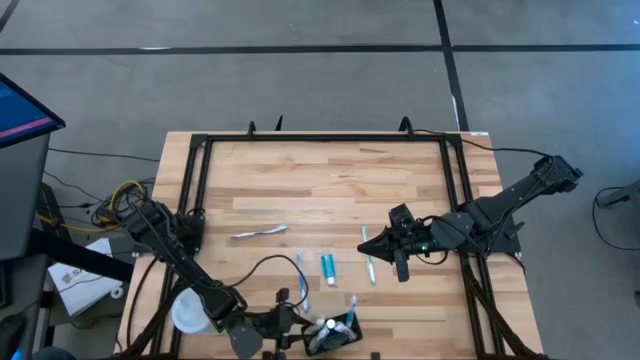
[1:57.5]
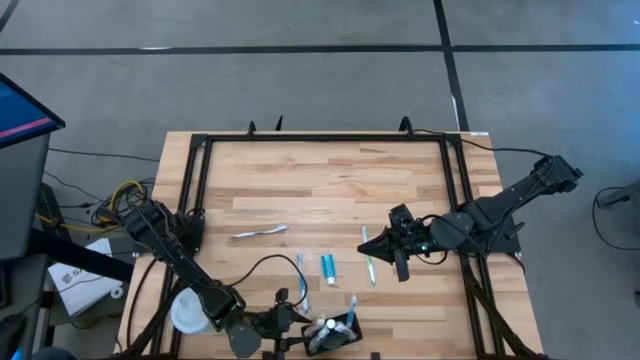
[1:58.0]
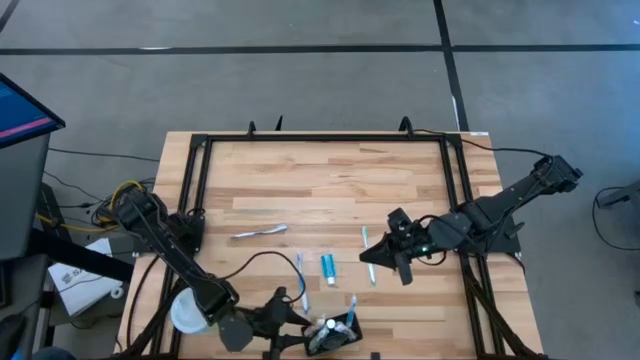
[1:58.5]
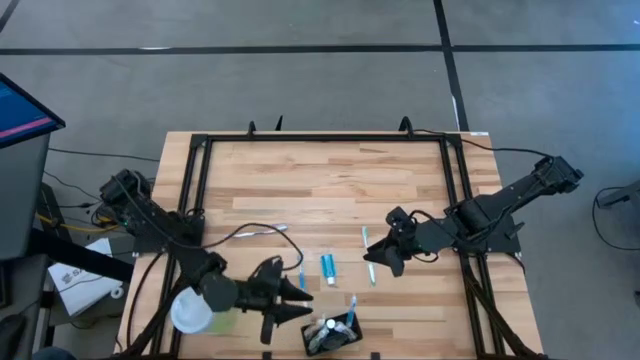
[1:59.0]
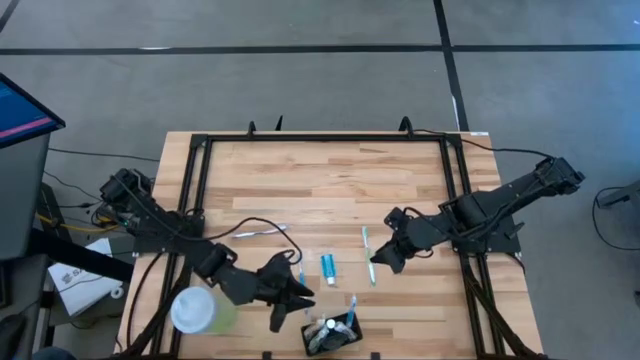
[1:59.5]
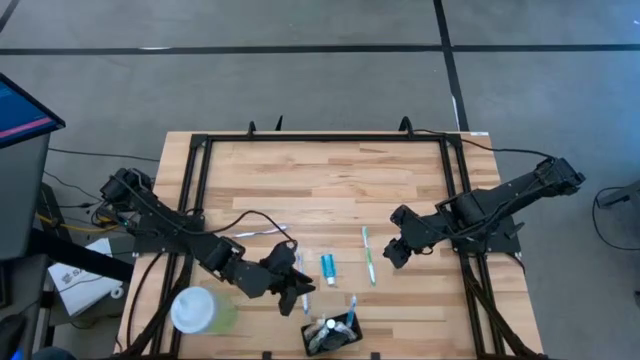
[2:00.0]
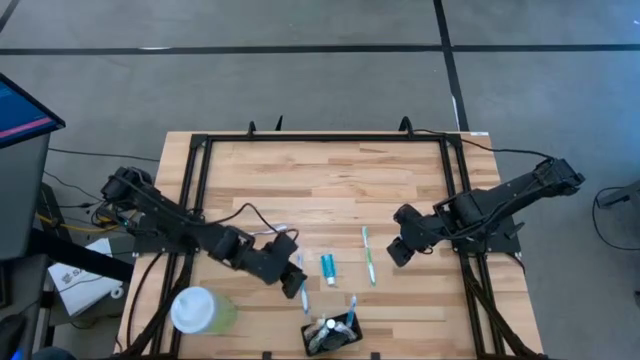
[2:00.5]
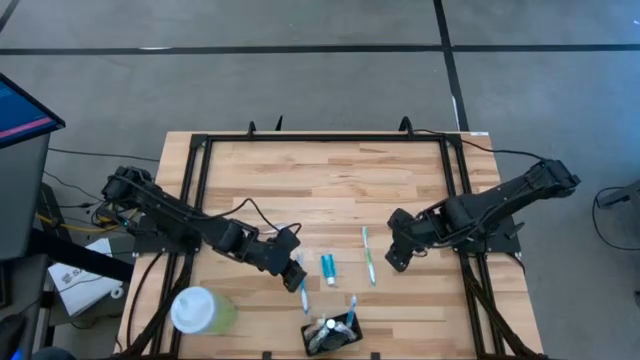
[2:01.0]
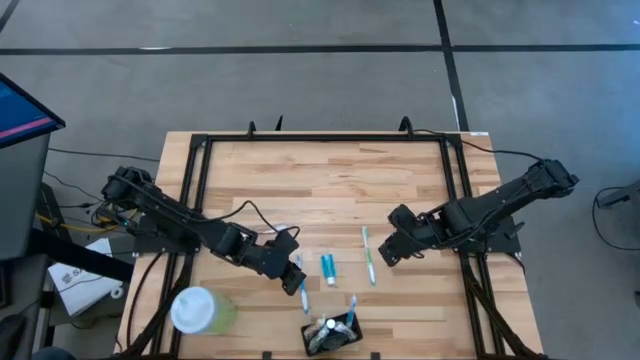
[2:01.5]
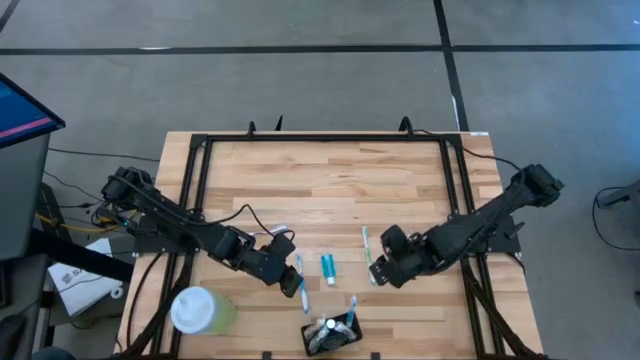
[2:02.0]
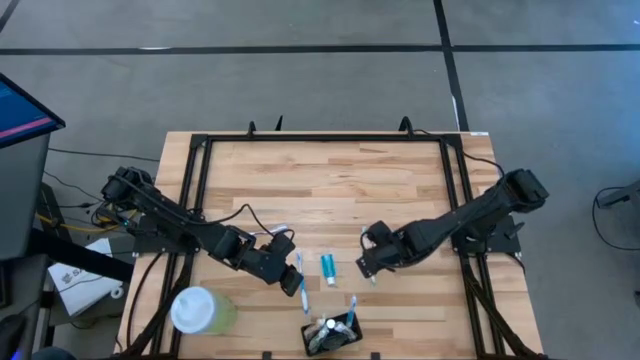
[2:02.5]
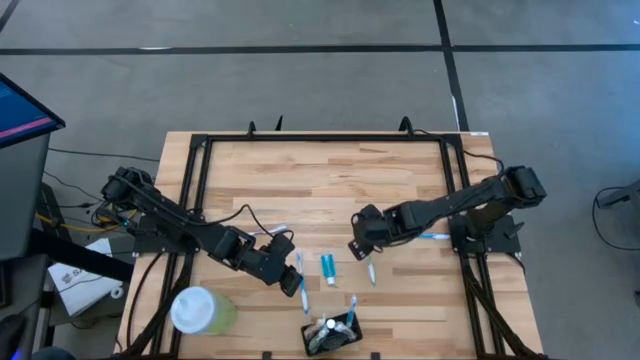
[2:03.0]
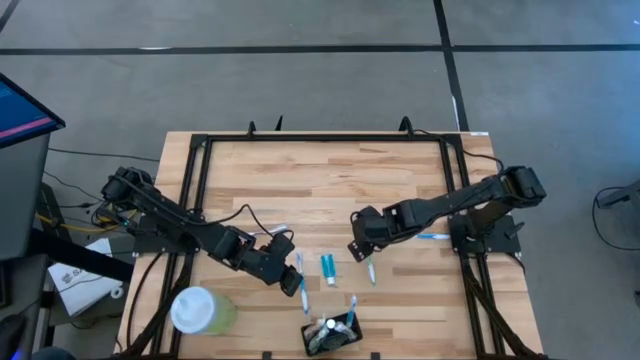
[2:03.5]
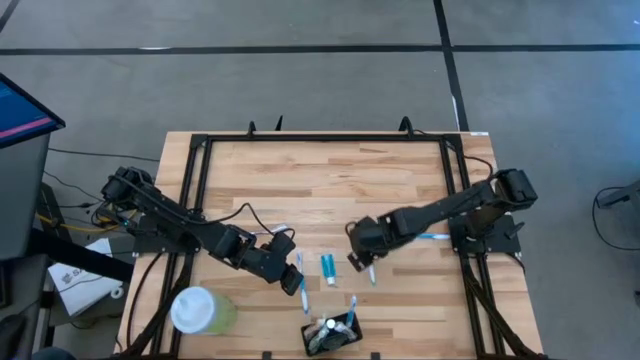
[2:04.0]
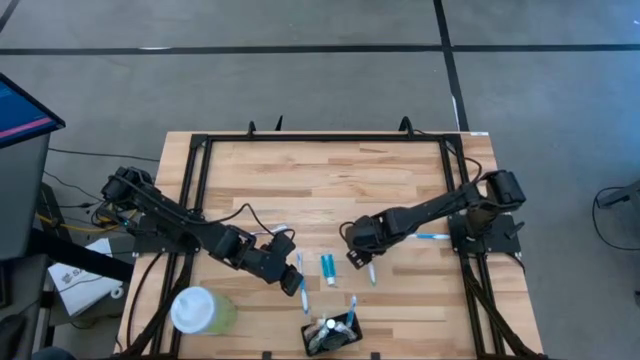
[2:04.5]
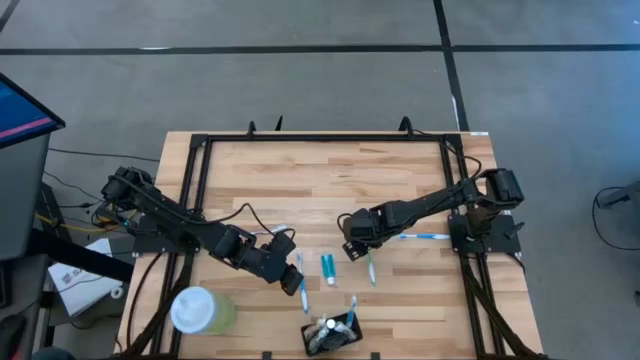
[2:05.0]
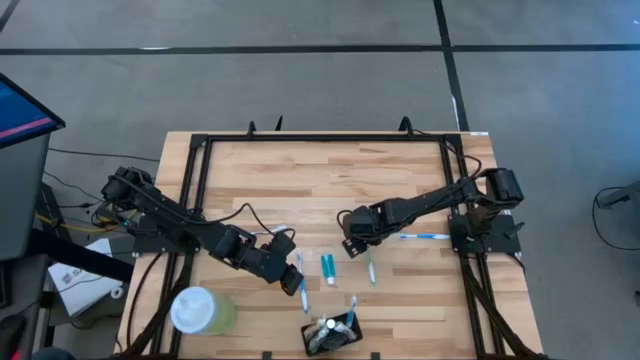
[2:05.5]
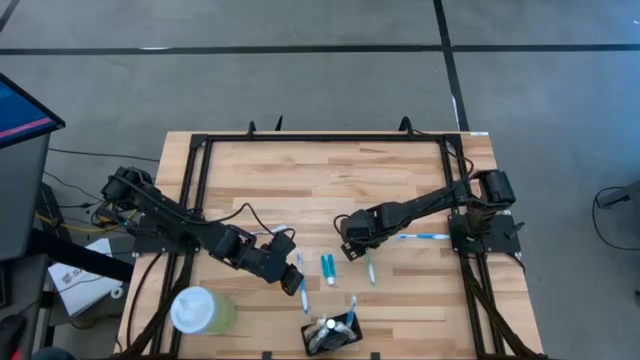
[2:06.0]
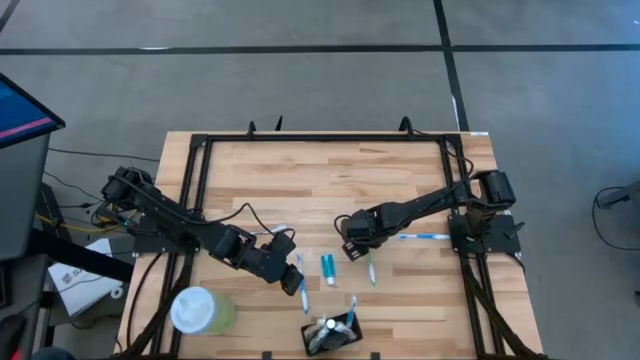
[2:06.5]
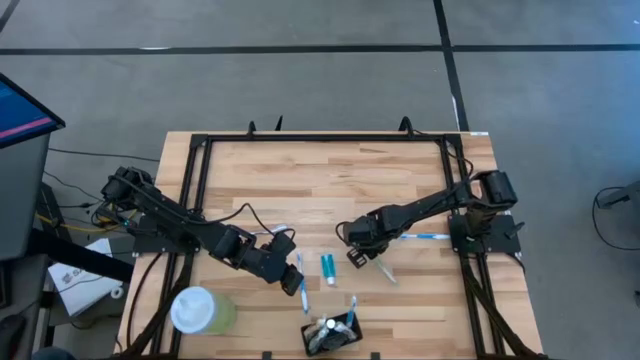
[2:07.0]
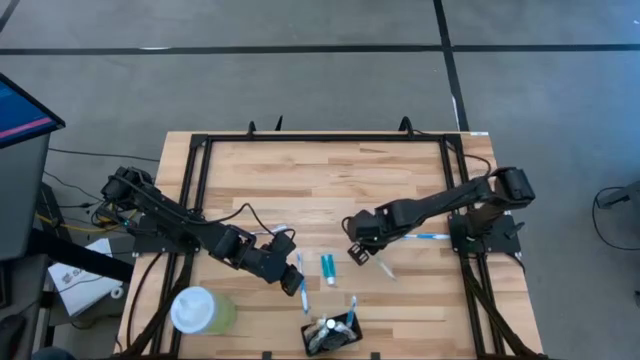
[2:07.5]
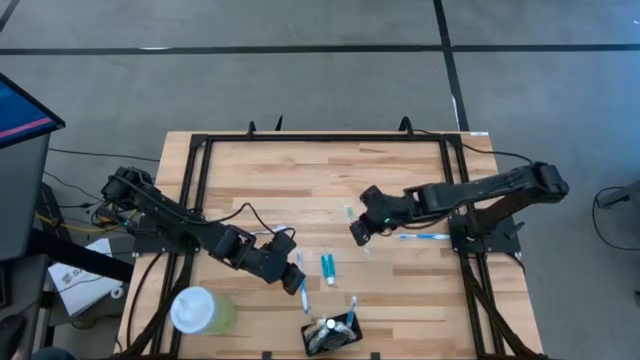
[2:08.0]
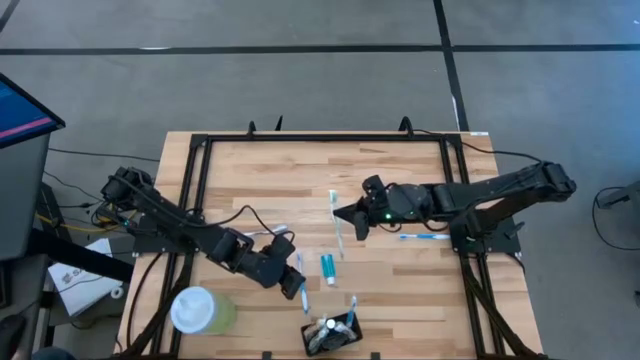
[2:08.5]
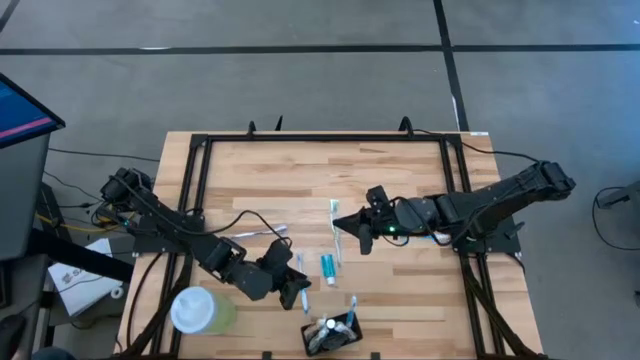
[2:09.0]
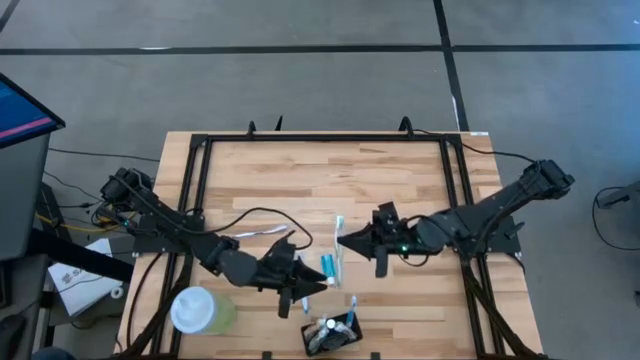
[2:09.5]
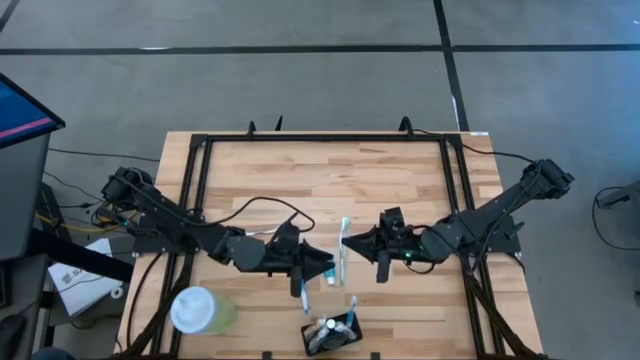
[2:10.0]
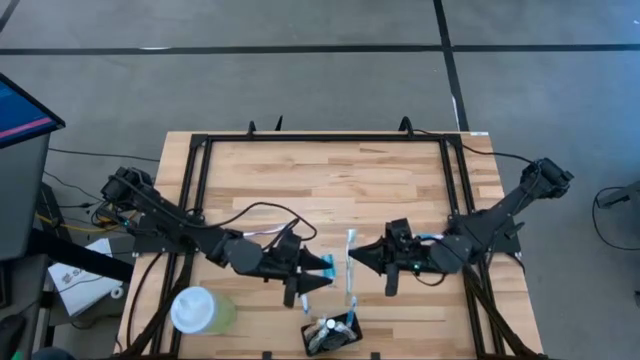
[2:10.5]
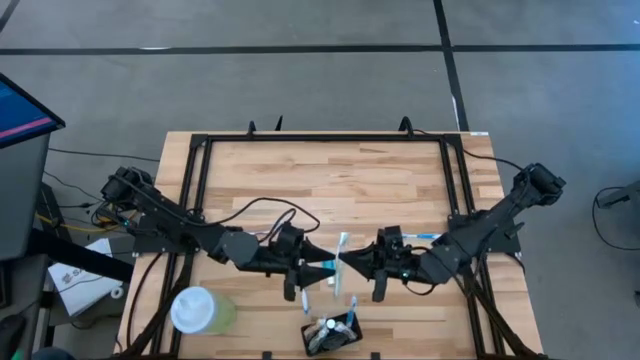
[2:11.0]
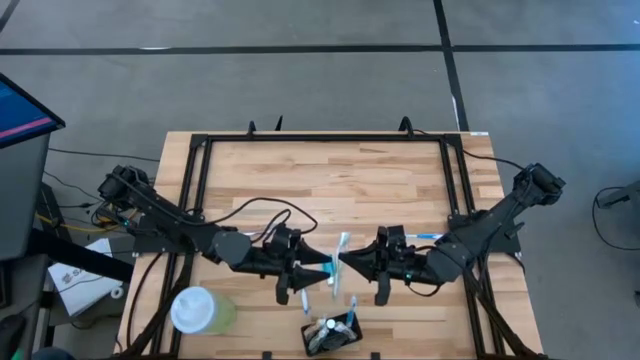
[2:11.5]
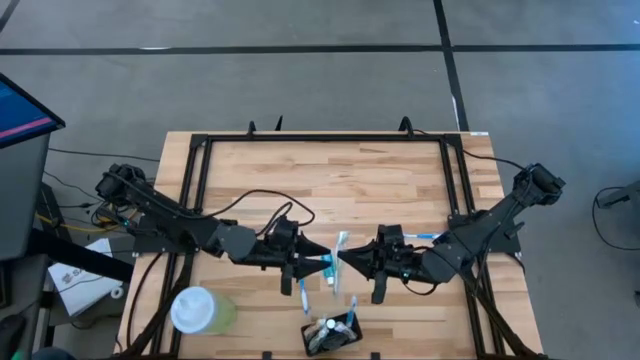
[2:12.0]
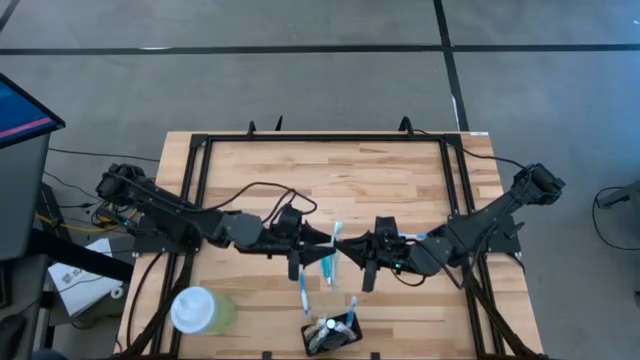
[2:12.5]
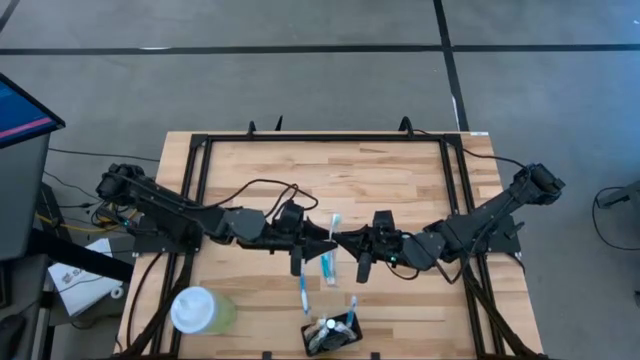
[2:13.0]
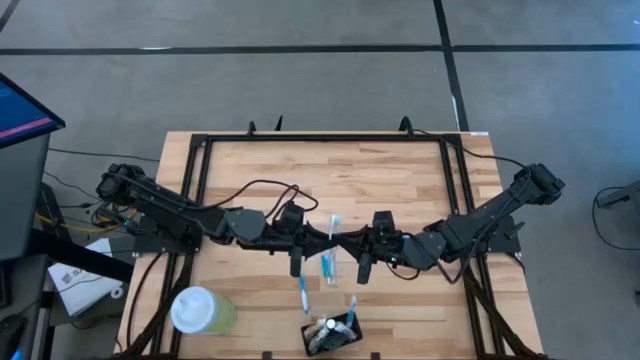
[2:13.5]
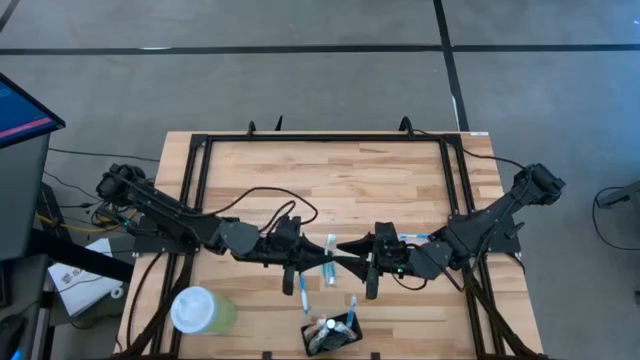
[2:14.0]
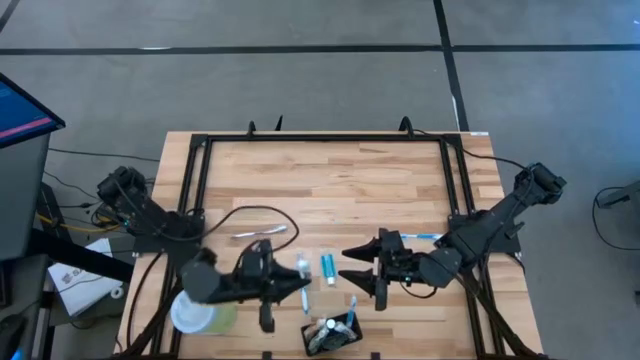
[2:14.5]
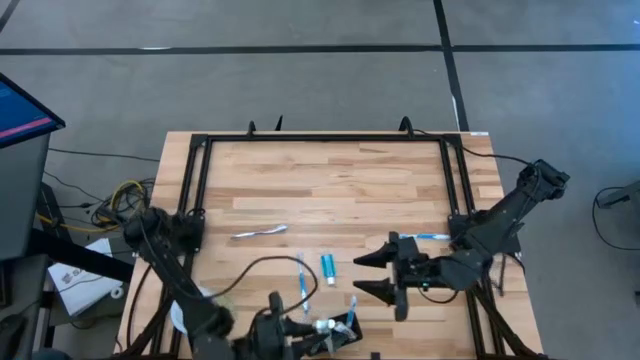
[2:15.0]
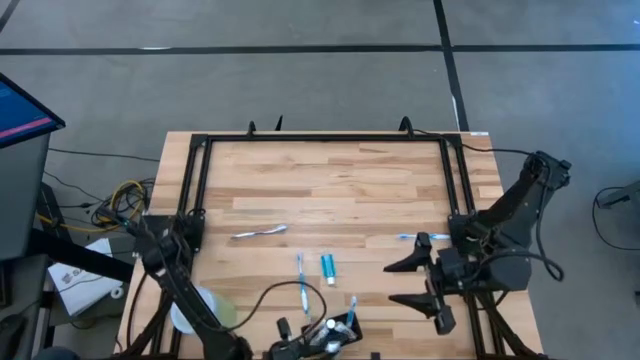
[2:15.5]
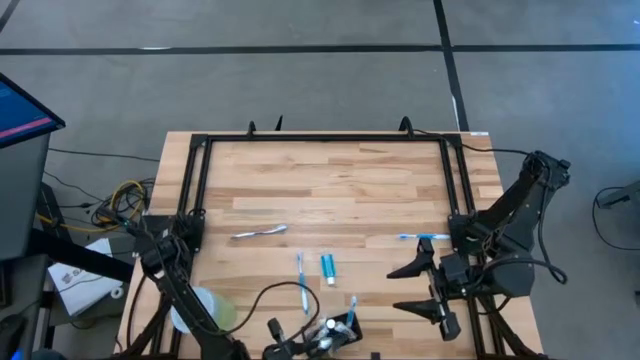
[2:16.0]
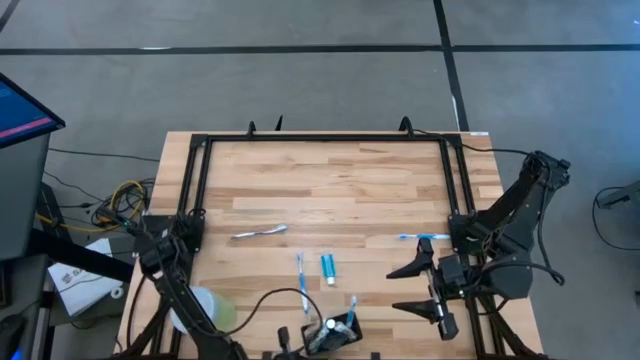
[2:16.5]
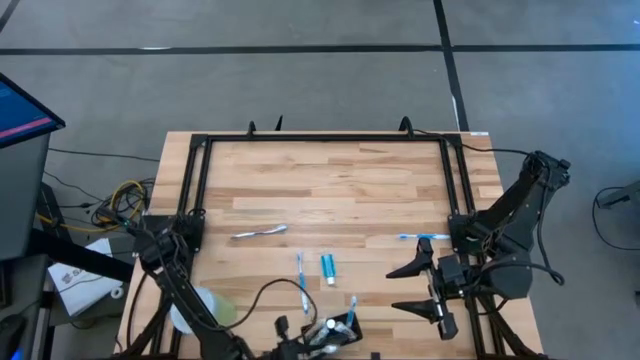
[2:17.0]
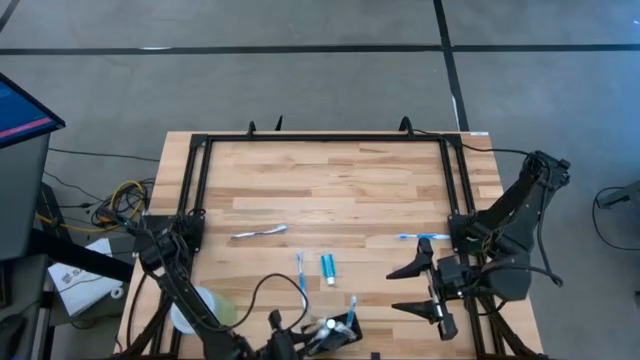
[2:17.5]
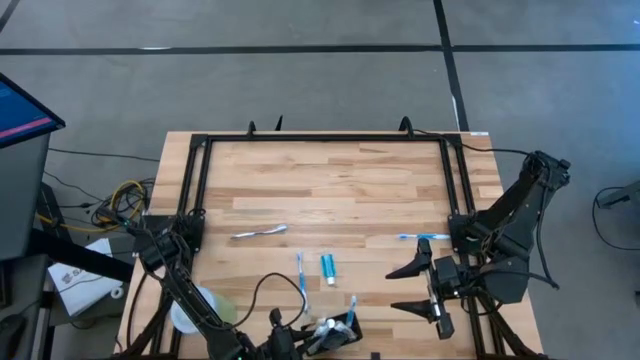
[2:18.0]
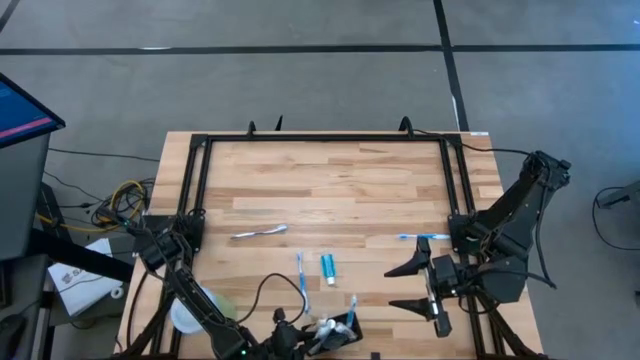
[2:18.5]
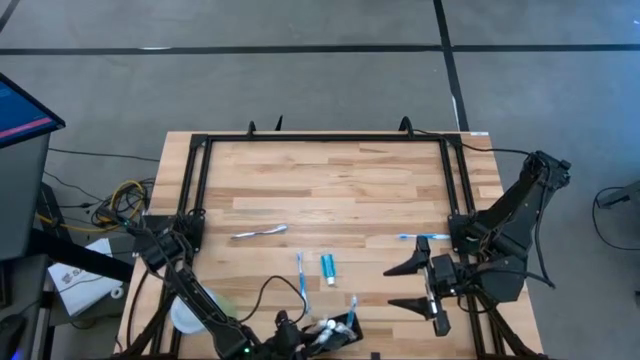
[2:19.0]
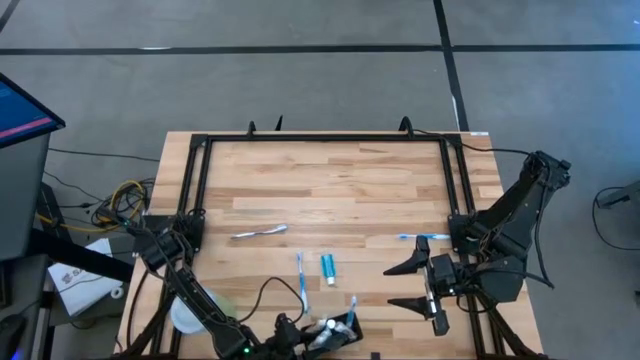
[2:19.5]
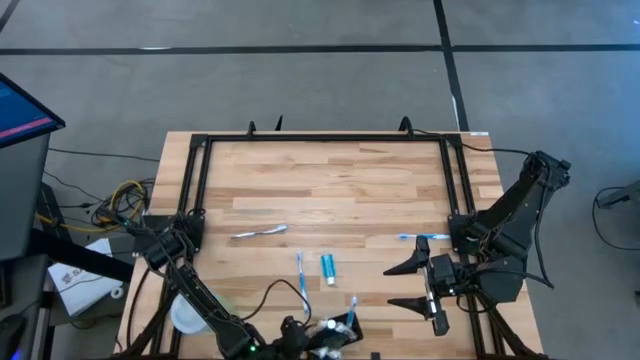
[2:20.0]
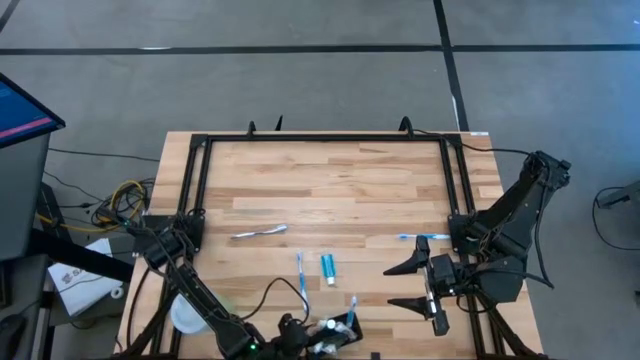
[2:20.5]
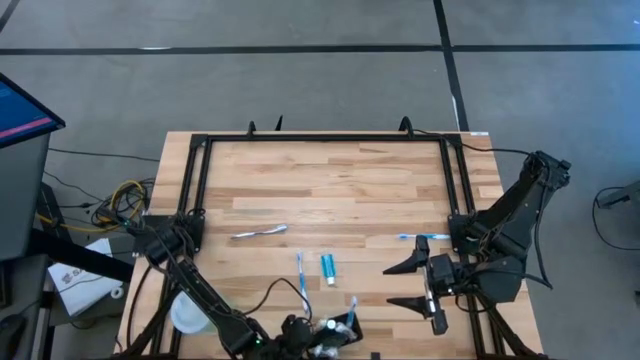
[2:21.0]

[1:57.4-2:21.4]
Task: Pick & Place toothbrushing station
Put the green toothbrush into the black wire organizer
